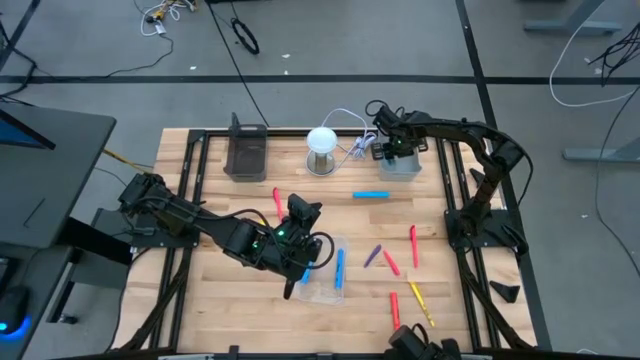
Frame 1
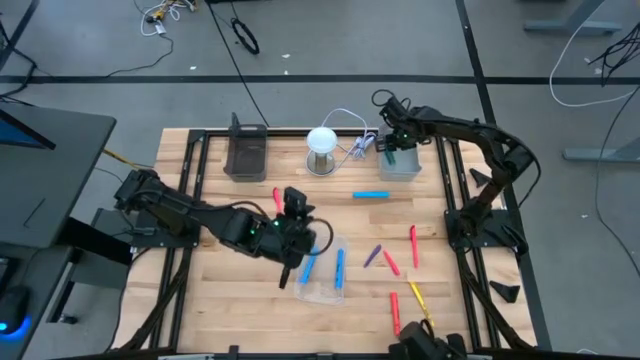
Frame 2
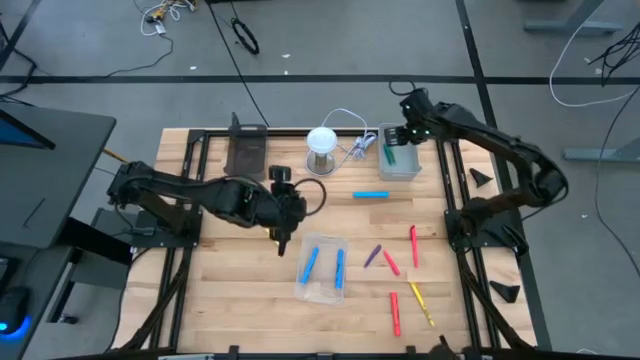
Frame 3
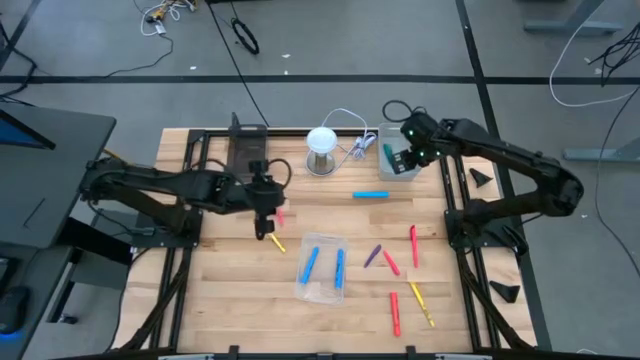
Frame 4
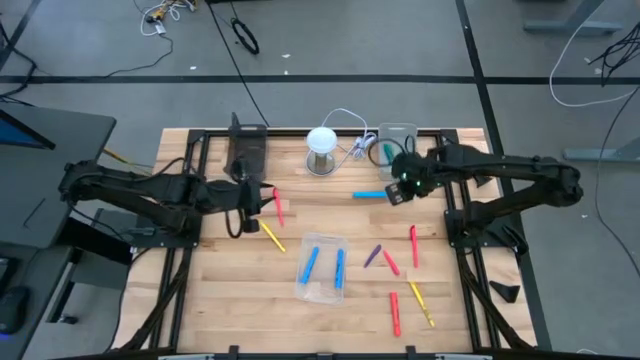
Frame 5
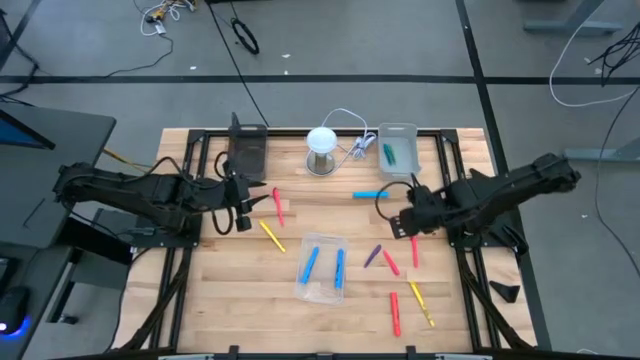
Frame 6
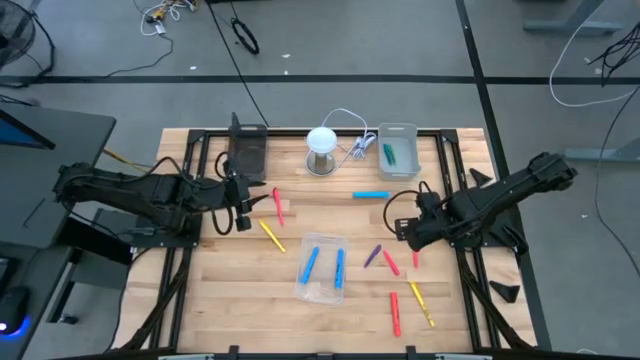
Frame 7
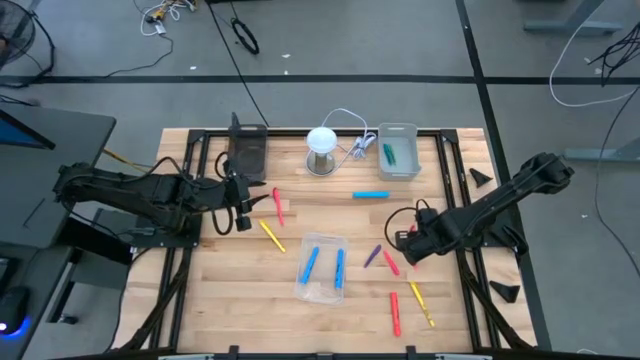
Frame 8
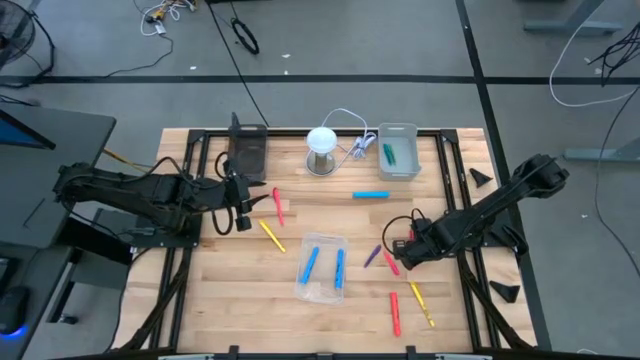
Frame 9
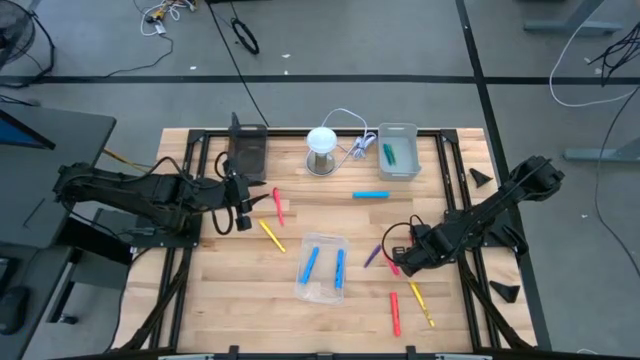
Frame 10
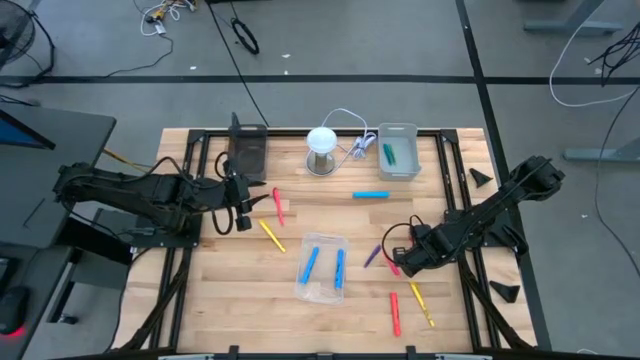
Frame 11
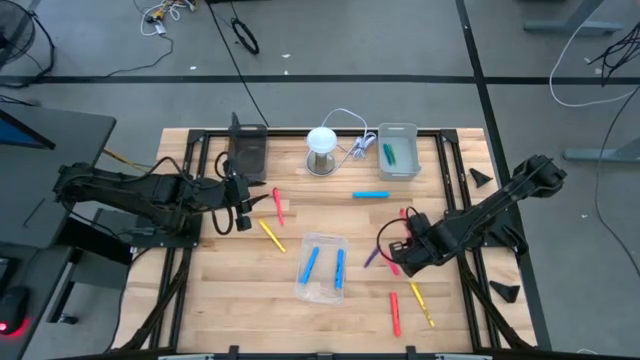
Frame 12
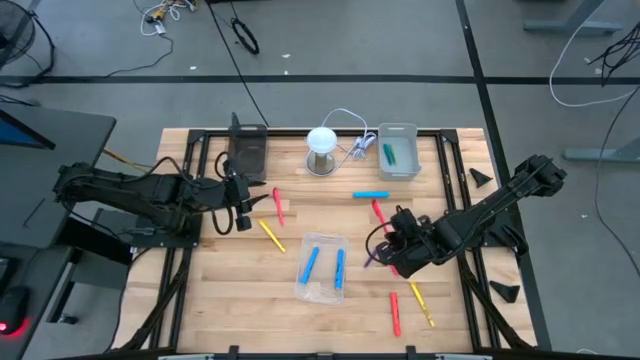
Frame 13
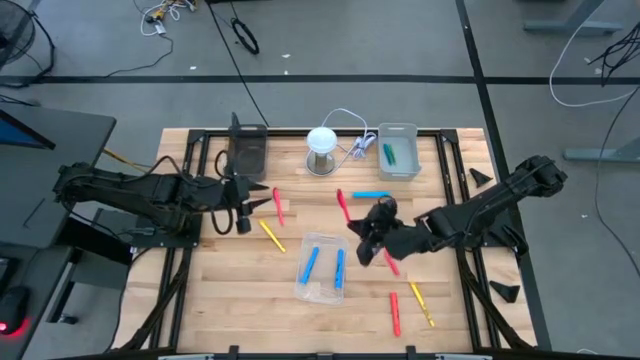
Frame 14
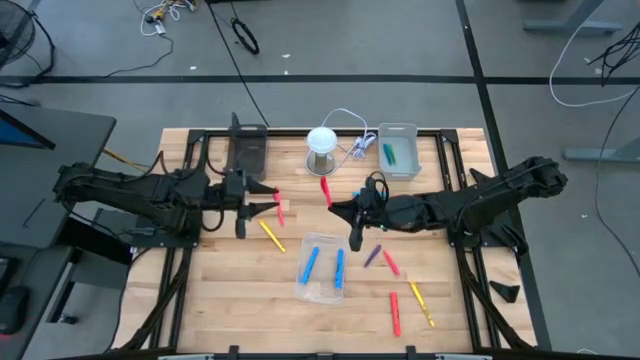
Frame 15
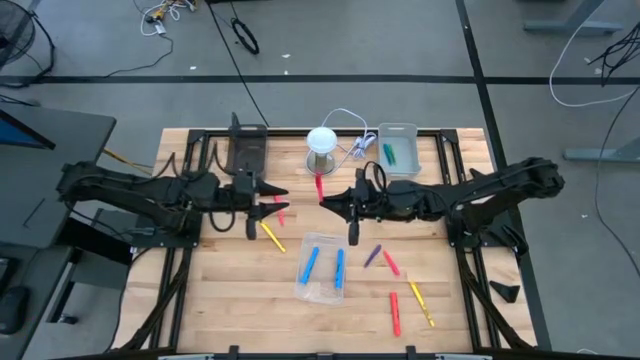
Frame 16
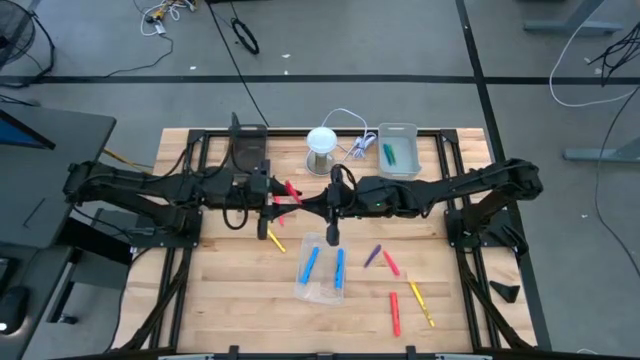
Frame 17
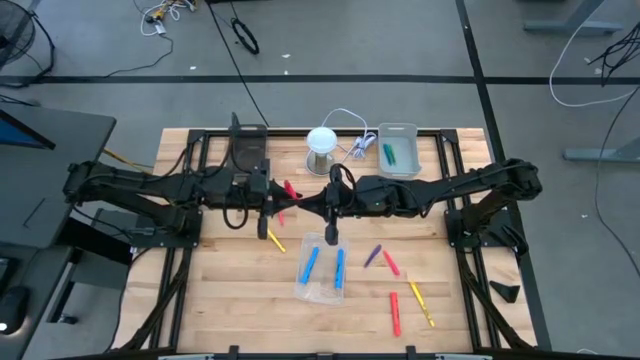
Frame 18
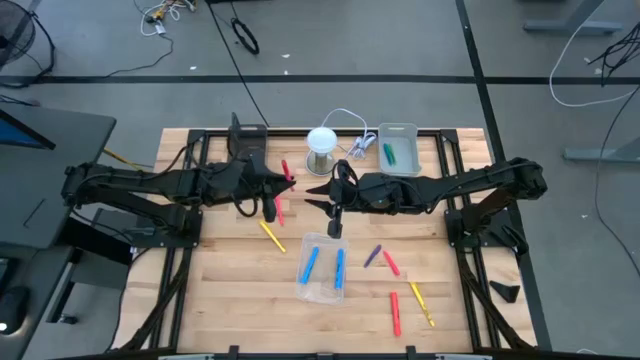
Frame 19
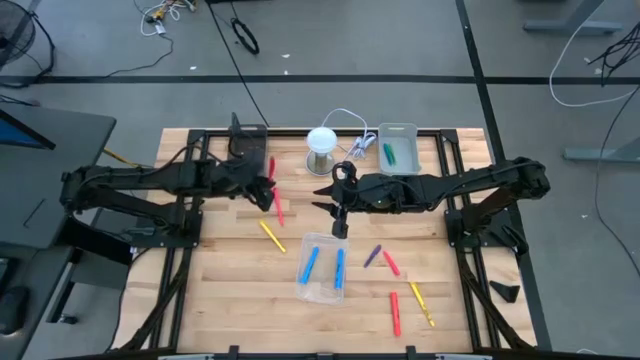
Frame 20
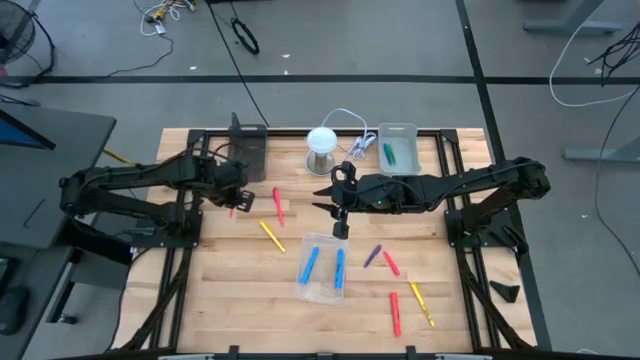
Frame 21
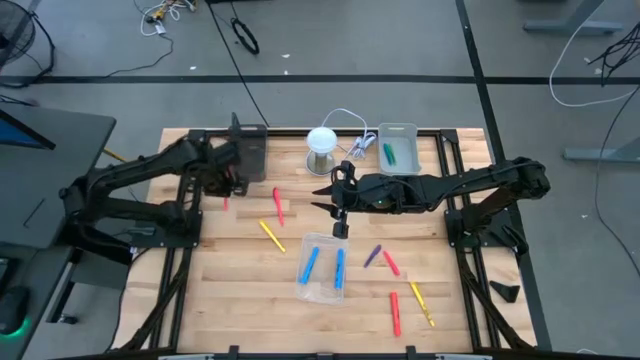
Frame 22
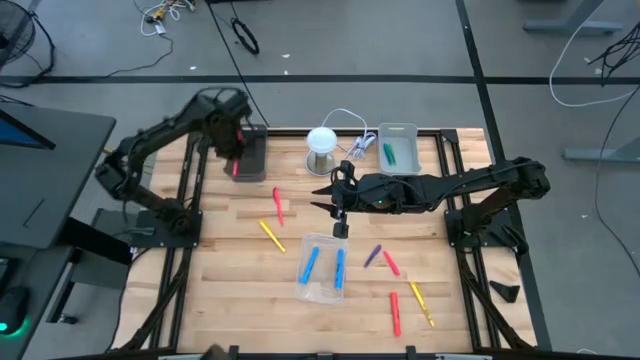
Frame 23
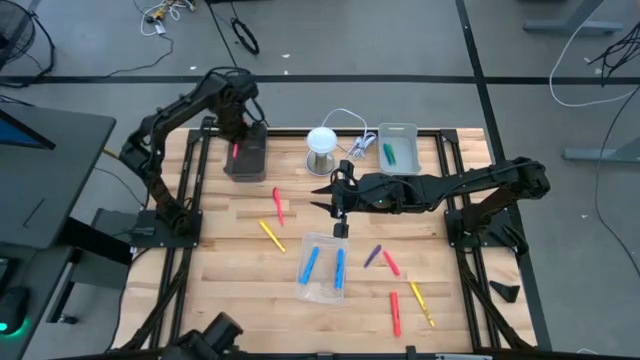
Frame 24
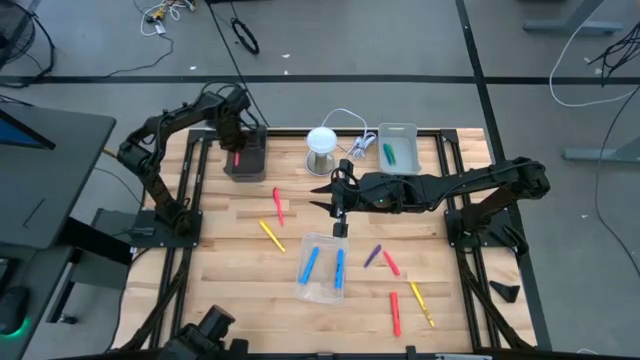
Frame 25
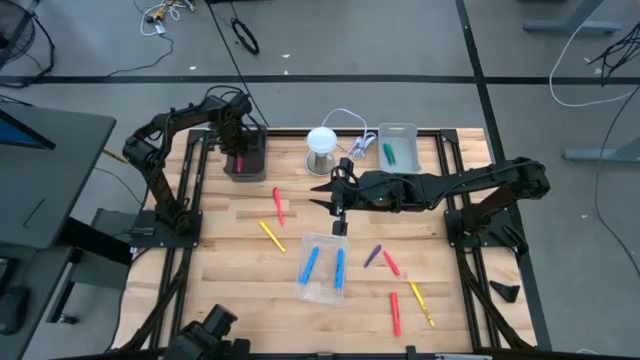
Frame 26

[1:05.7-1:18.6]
Task: Pick & Place Markers
Put the bottom pink marker into the black bin

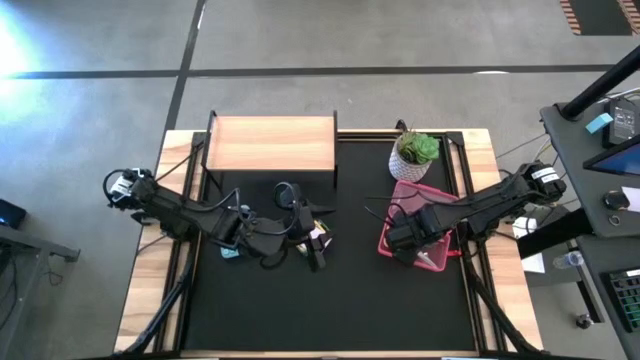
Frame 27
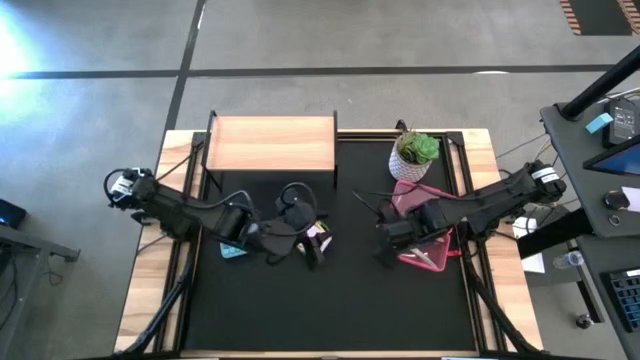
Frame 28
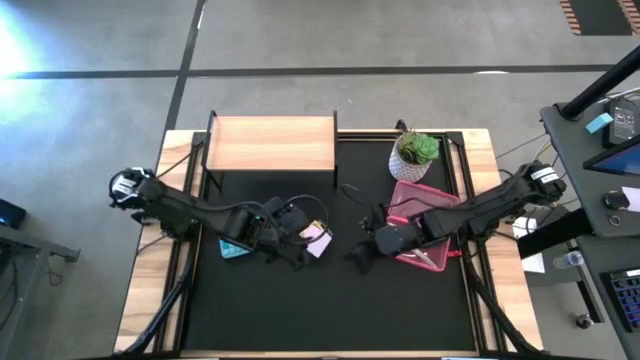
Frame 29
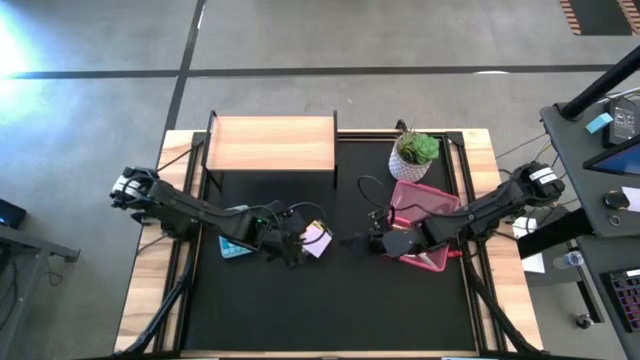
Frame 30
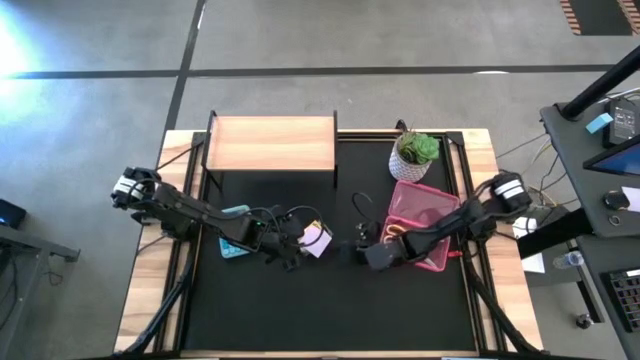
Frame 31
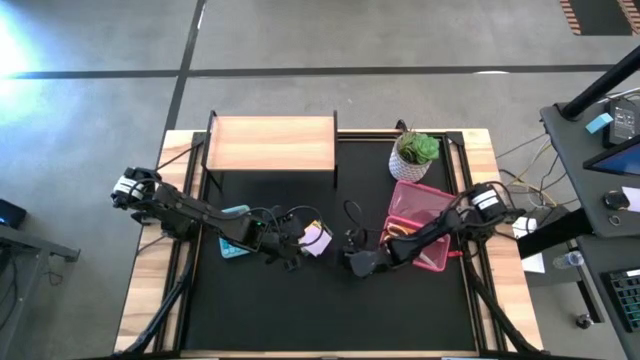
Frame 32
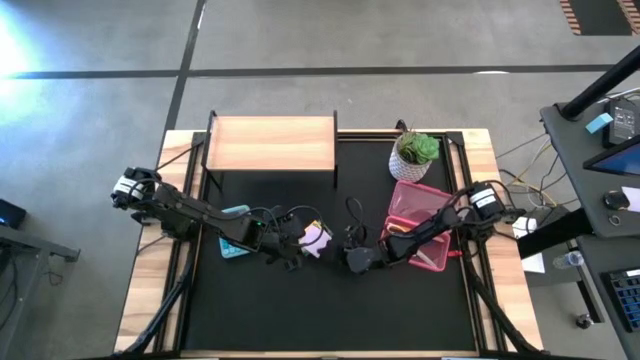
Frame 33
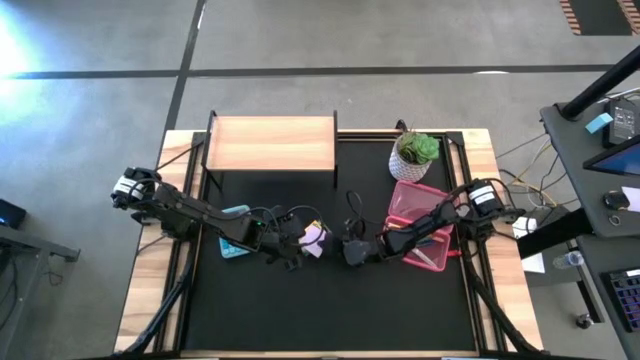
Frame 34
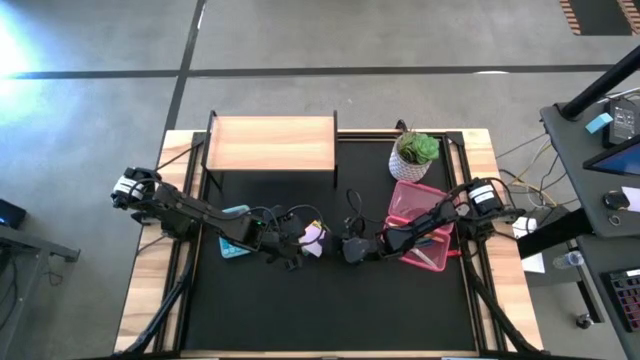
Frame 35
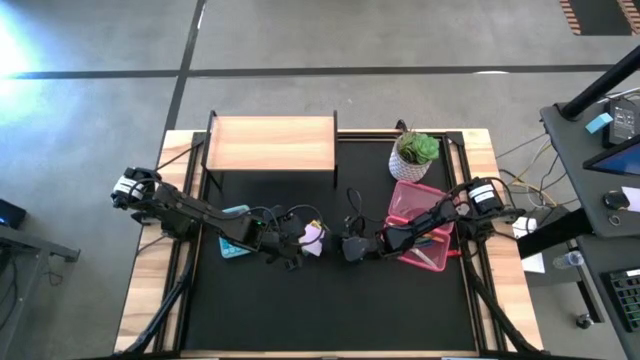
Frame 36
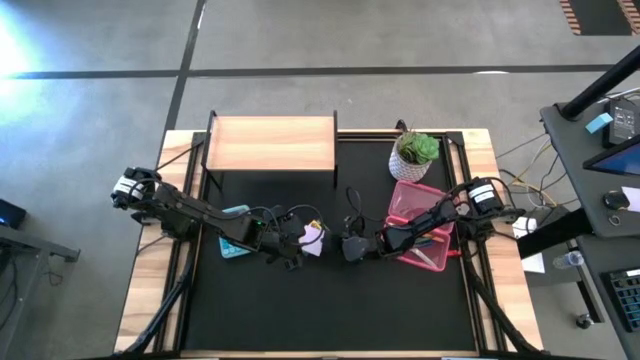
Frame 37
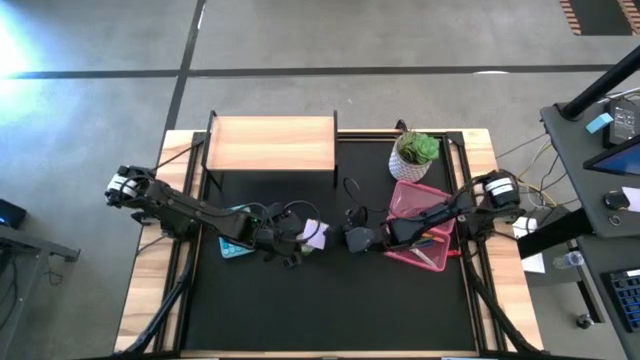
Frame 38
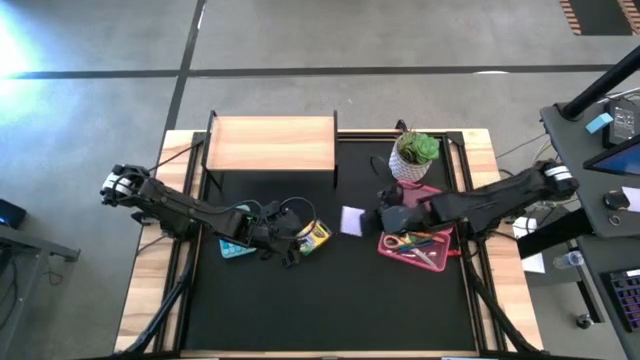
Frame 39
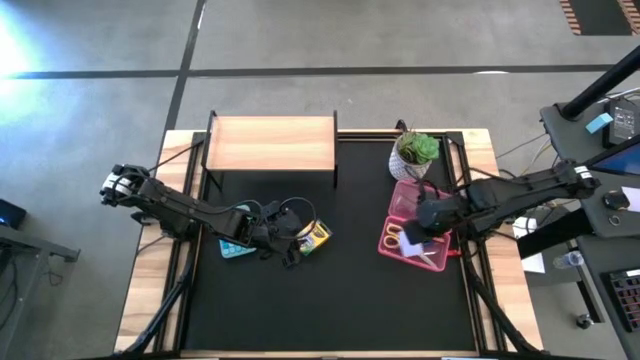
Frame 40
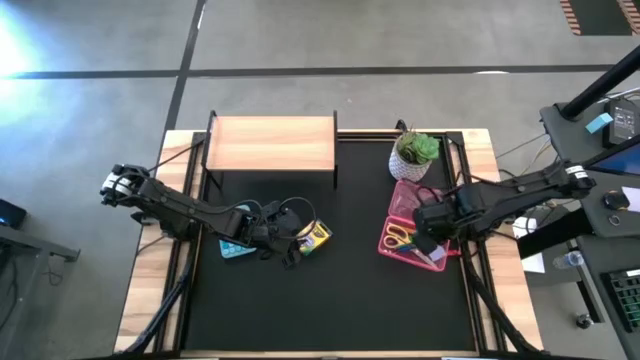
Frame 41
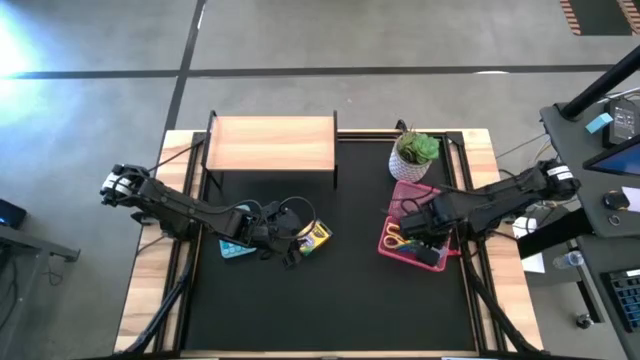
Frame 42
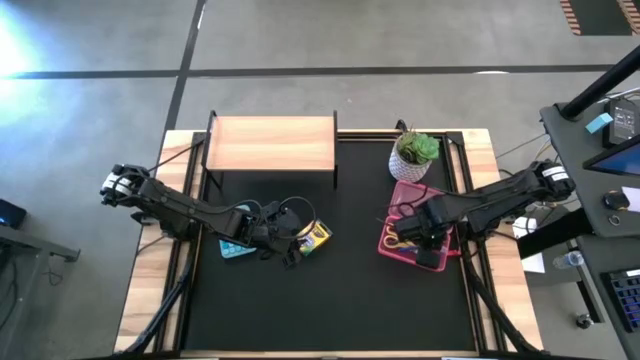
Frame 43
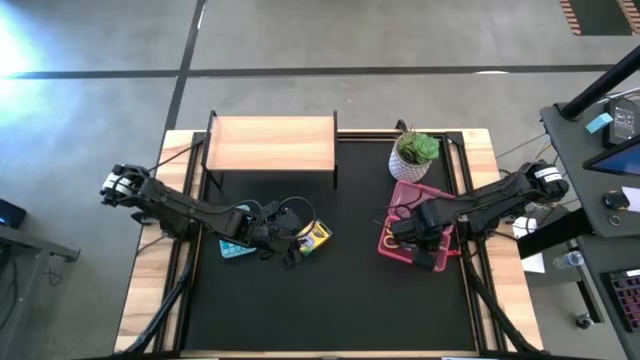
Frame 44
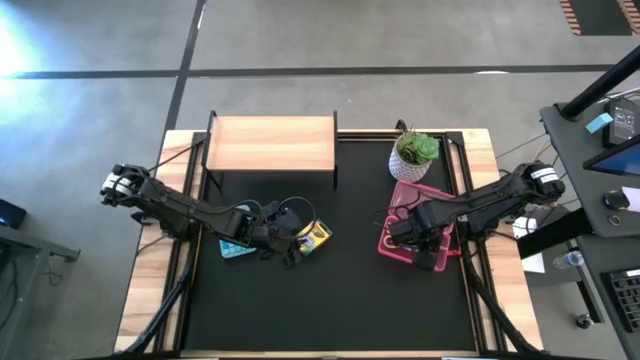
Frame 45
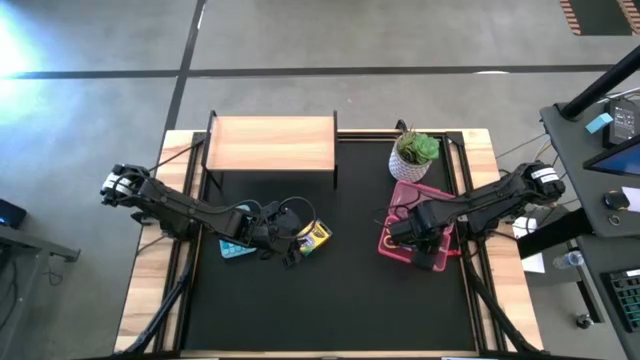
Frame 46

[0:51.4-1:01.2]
Task: Pack school essentials
Put the pink sticky notes into the pink supply box
